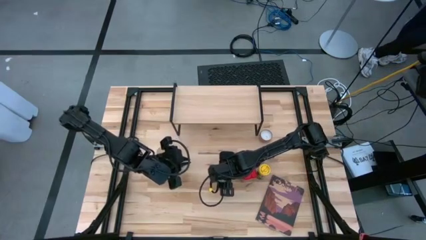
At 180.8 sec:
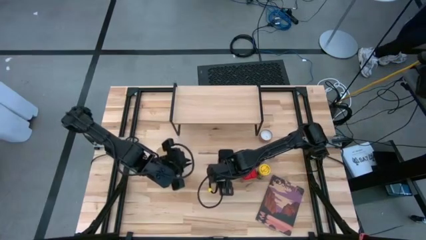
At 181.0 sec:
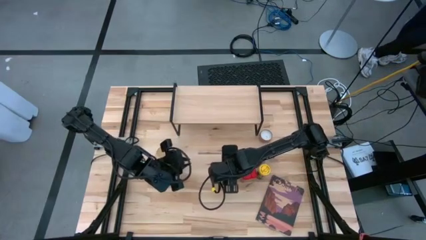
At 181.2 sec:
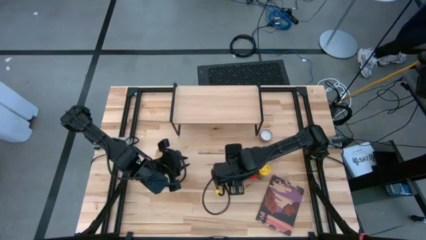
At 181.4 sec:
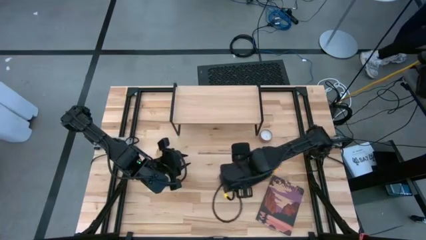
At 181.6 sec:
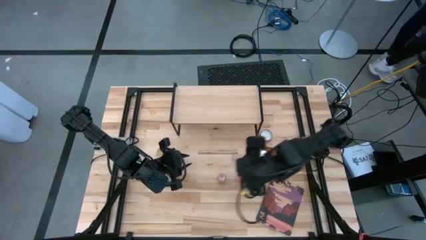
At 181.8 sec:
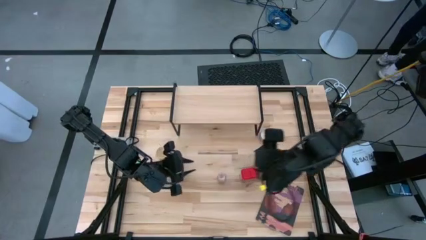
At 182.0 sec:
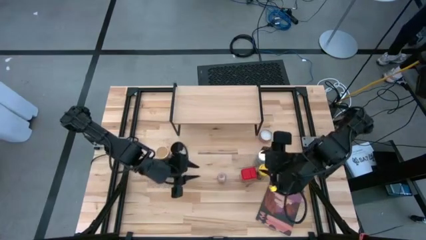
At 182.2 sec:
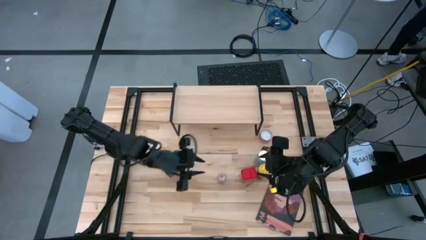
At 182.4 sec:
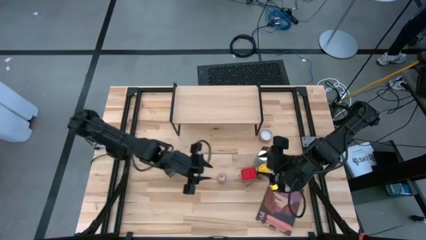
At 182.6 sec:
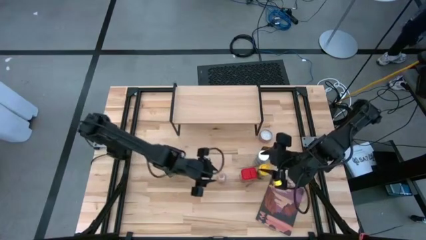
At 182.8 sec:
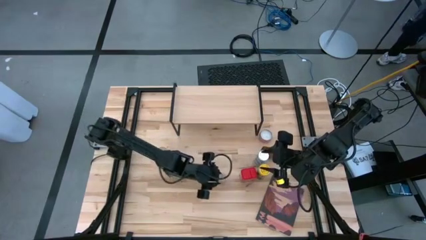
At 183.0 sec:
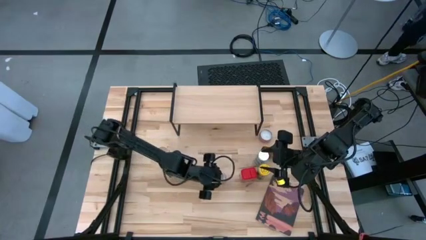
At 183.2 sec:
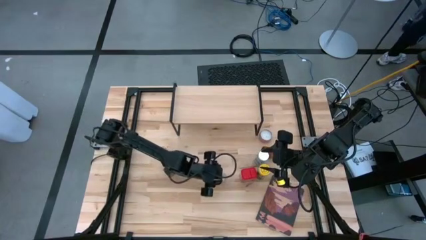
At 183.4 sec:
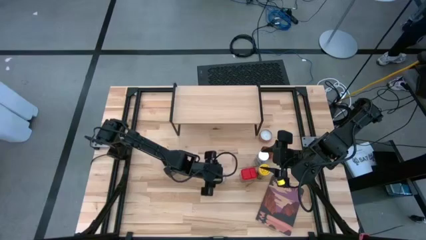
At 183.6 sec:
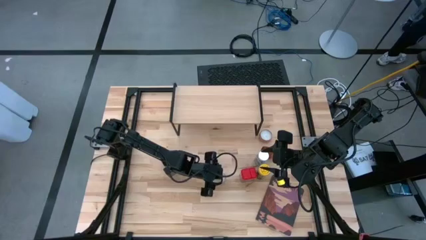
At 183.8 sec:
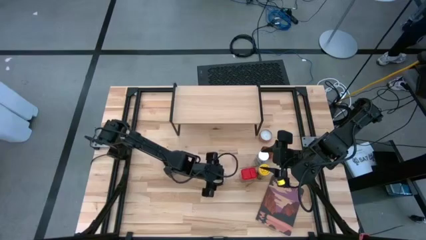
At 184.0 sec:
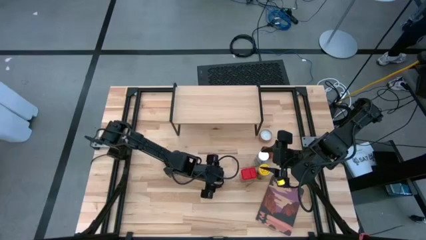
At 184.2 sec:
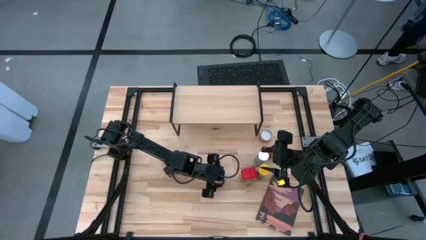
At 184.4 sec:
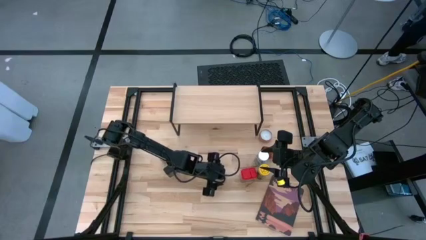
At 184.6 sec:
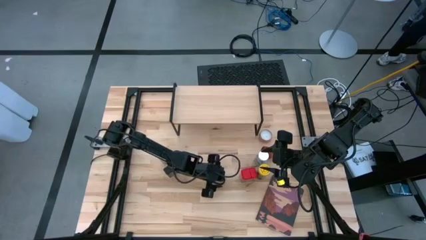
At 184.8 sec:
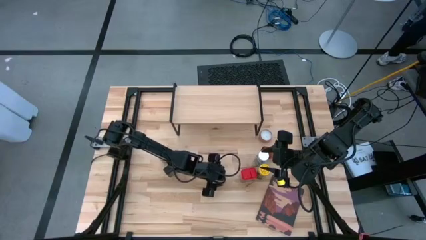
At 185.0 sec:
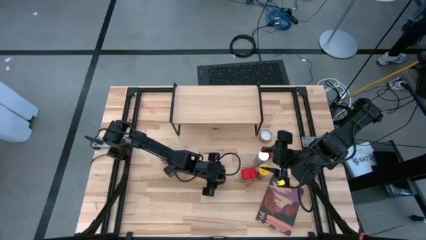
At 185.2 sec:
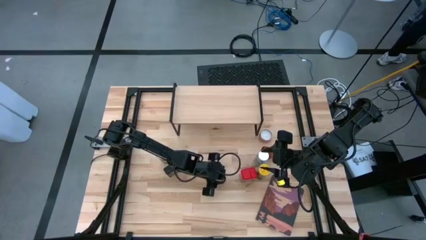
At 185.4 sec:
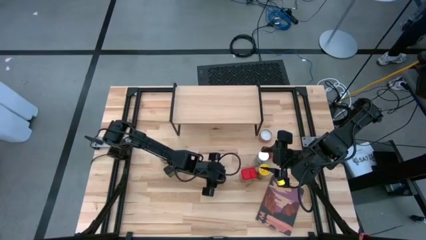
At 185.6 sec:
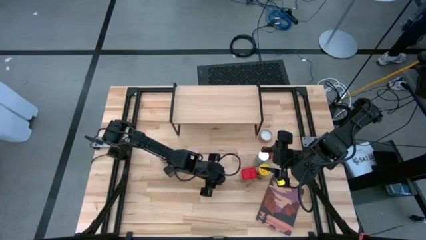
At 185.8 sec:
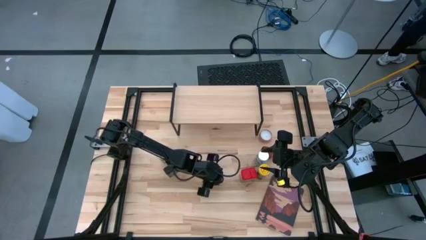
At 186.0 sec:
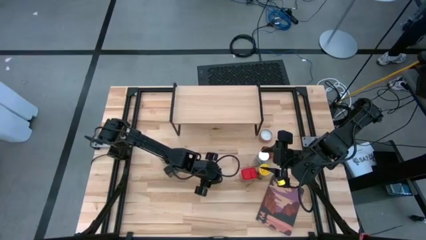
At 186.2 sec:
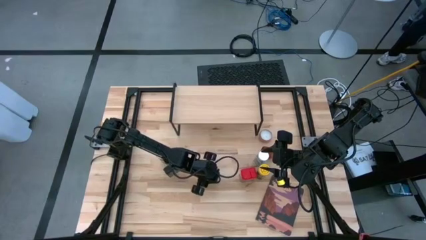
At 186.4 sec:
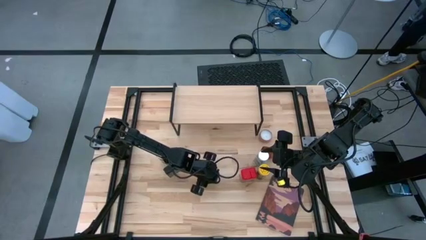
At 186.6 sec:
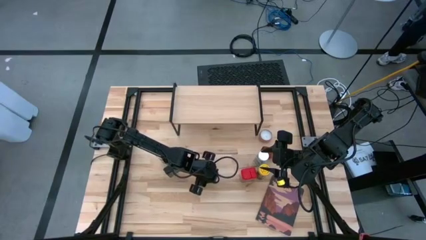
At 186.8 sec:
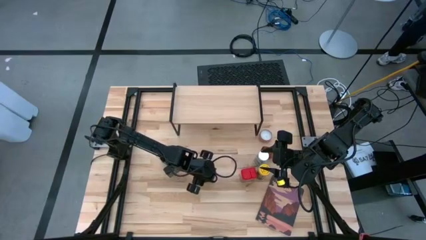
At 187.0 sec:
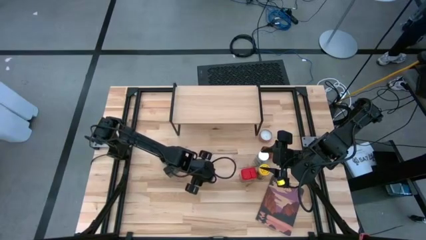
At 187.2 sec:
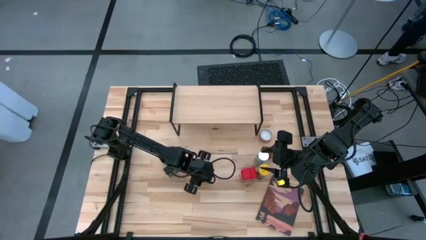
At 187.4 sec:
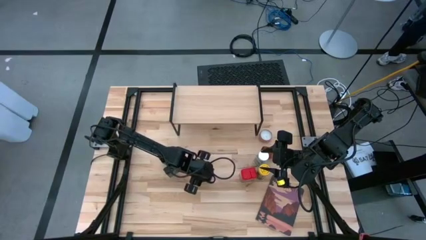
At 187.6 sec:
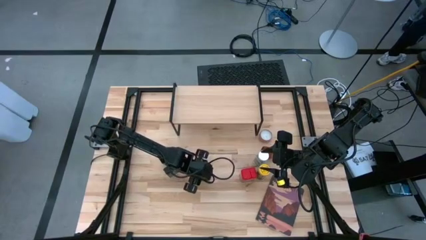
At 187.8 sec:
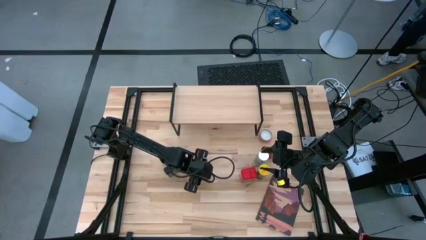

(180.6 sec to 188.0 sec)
Task: Shelf spices
Put the transparent spice bottle into the center of the table

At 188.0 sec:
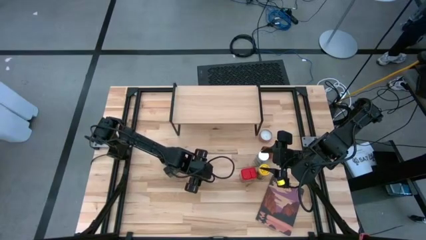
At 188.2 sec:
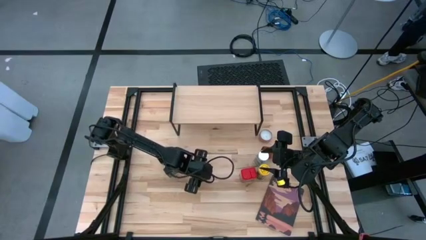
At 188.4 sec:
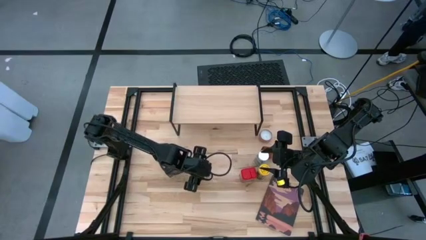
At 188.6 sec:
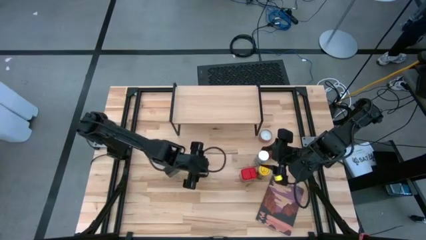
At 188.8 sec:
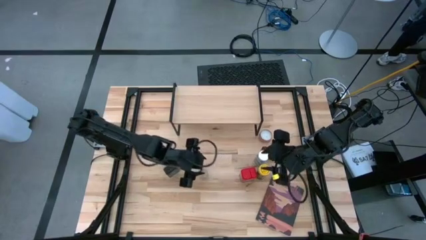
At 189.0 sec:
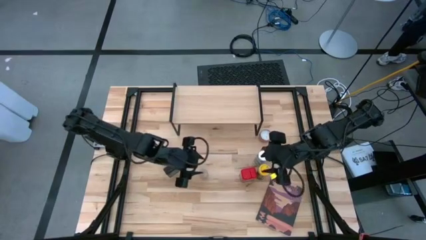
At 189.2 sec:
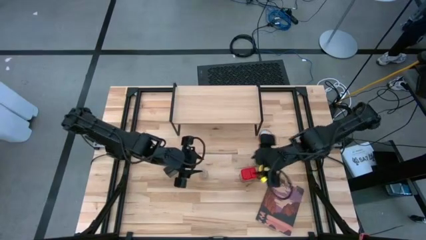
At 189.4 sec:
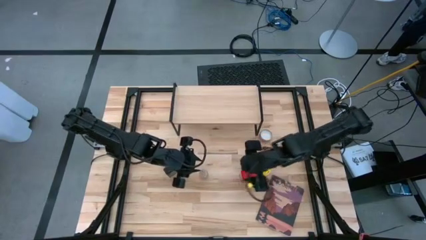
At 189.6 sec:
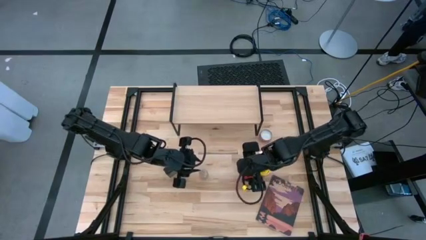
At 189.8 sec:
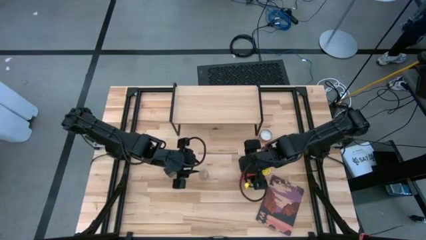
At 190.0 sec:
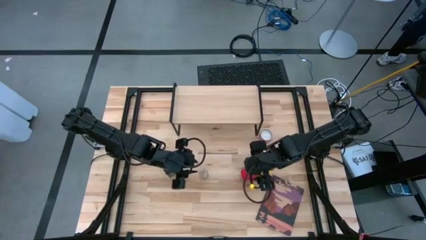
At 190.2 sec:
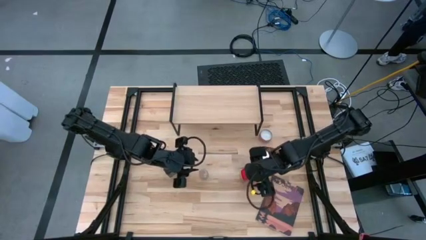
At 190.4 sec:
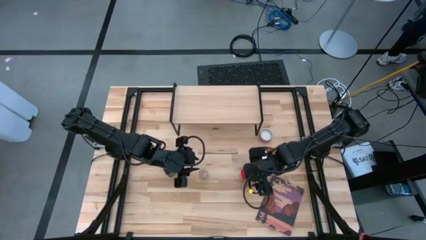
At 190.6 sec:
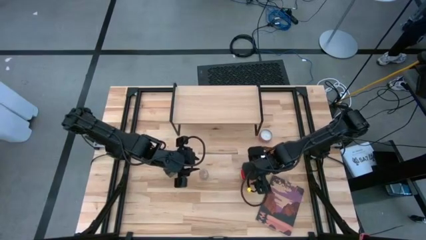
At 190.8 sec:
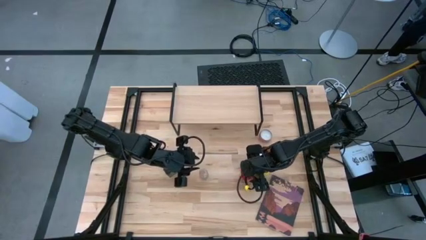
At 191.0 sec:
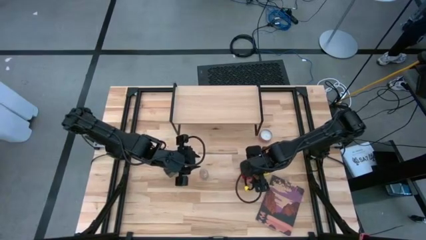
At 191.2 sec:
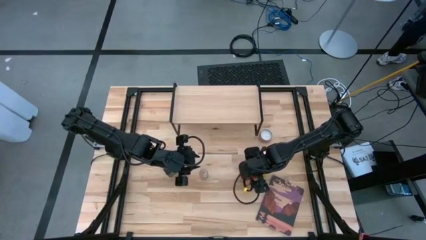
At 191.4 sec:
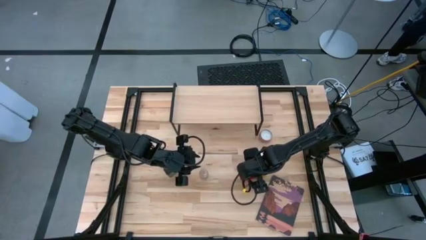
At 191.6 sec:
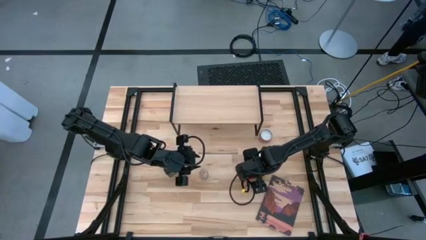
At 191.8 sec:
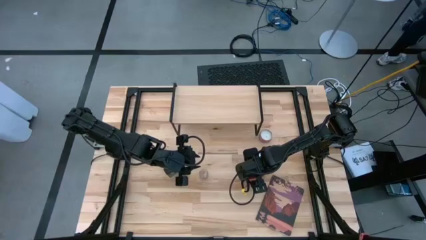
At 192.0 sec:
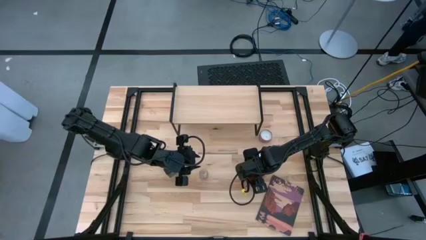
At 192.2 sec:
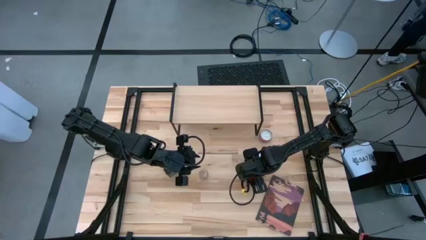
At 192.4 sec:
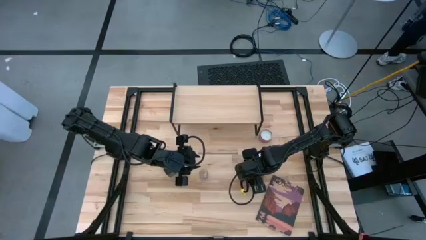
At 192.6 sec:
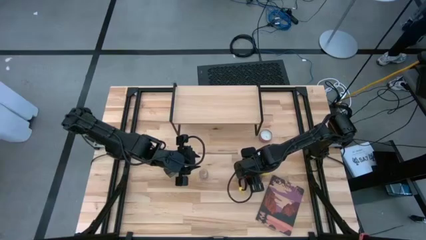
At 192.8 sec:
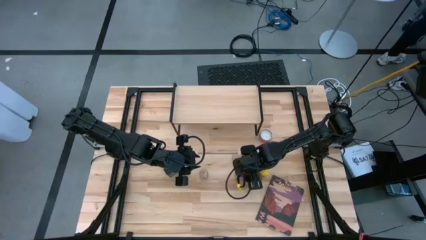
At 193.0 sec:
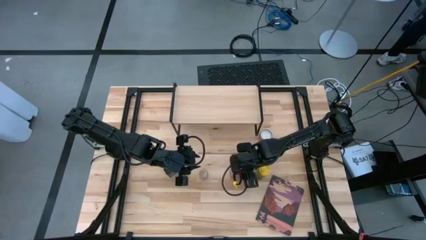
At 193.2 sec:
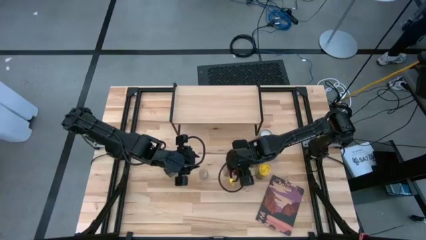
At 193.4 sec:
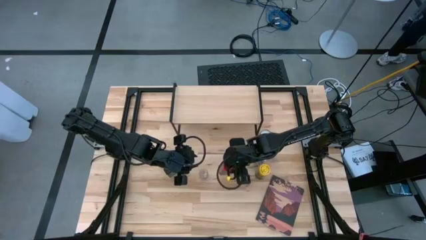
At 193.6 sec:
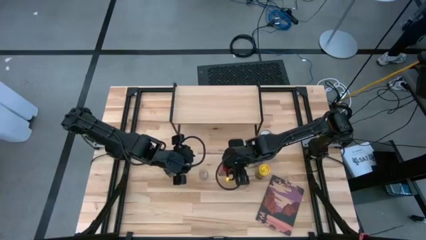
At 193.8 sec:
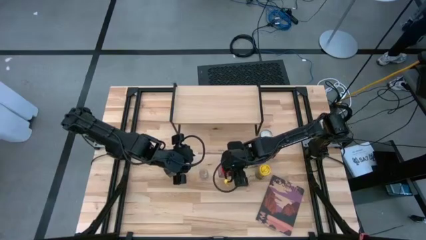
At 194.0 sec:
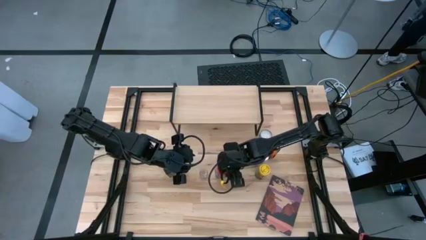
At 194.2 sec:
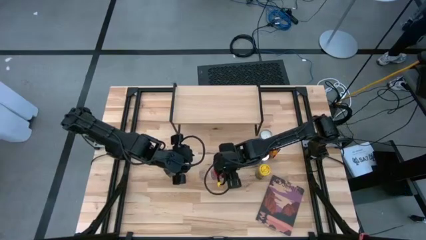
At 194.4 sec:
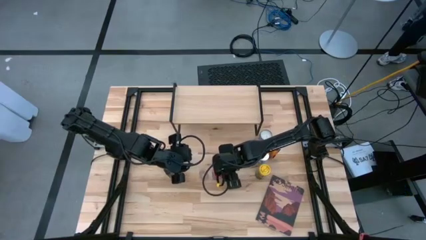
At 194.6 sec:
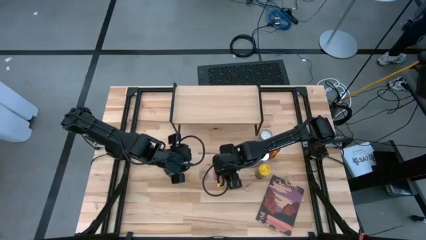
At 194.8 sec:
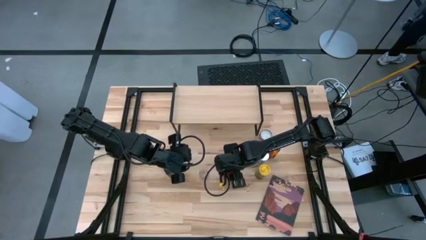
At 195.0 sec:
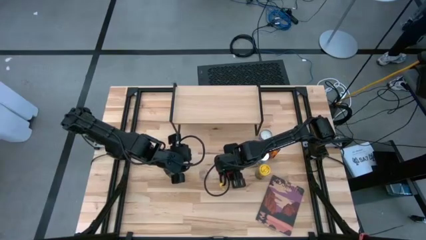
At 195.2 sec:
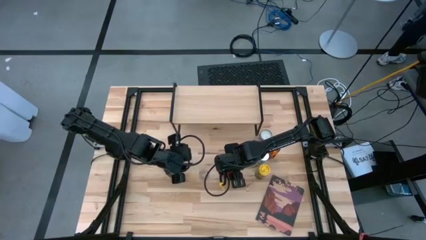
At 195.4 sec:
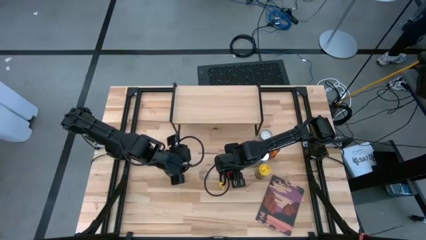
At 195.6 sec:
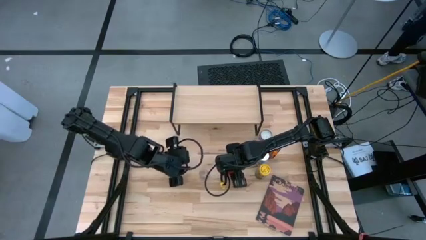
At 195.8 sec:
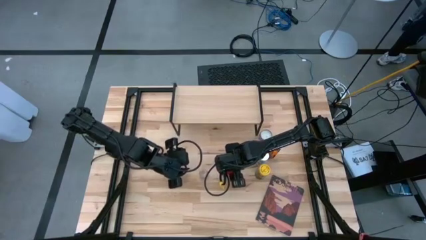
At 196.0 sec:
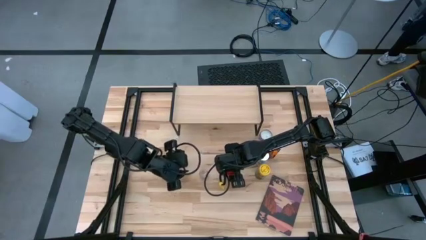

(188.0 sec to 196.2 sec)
Put the red spice can into the center of the table
